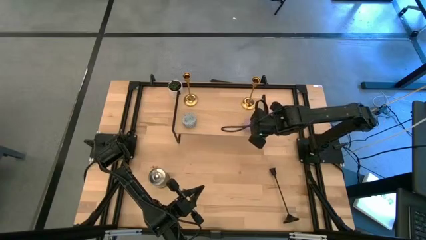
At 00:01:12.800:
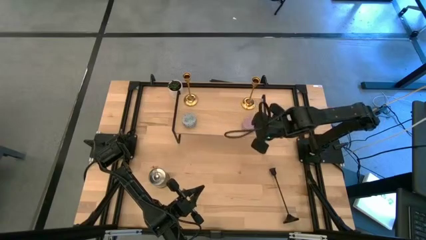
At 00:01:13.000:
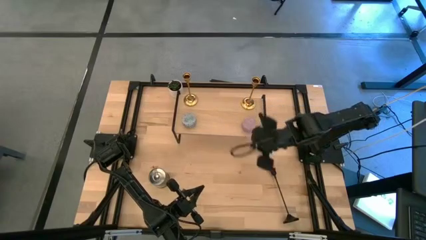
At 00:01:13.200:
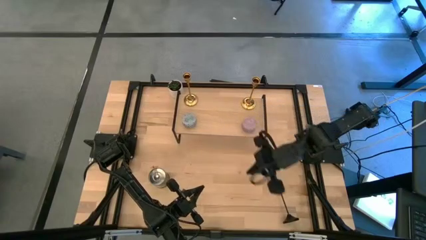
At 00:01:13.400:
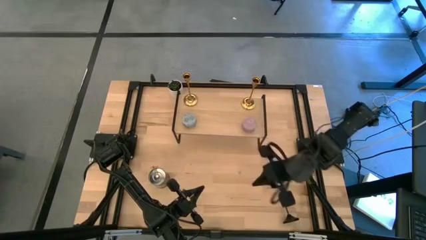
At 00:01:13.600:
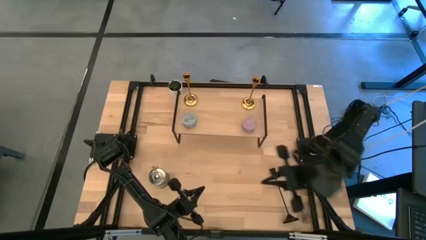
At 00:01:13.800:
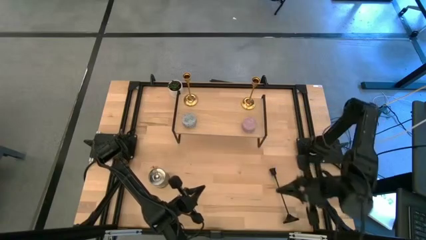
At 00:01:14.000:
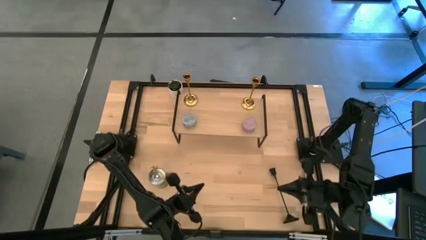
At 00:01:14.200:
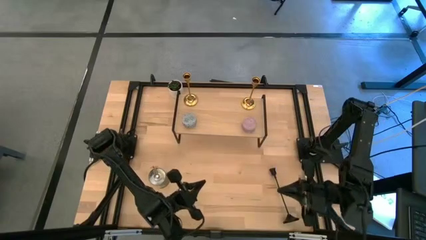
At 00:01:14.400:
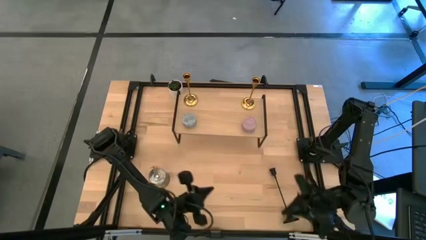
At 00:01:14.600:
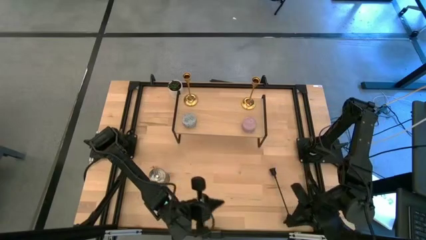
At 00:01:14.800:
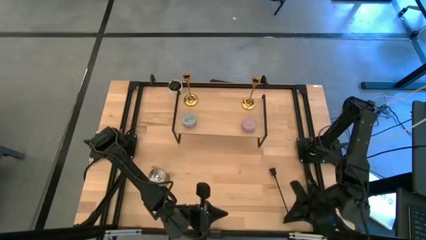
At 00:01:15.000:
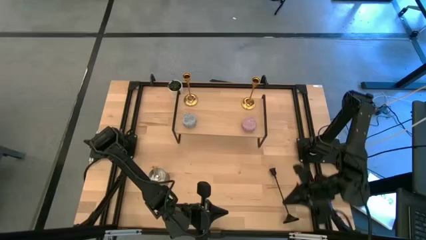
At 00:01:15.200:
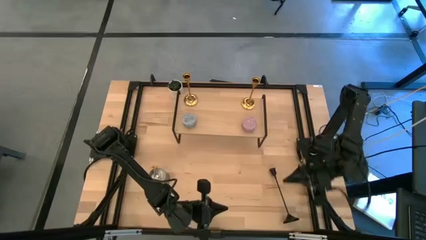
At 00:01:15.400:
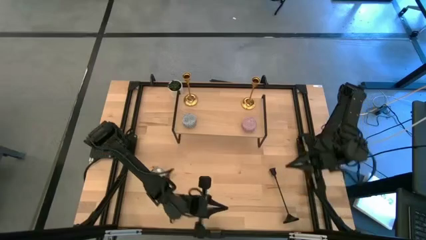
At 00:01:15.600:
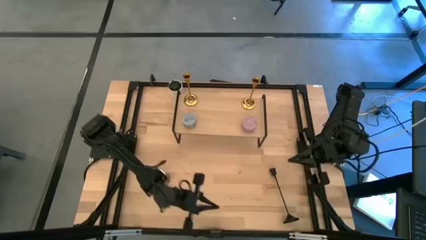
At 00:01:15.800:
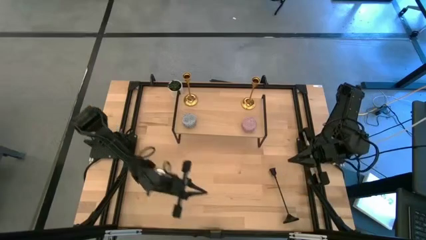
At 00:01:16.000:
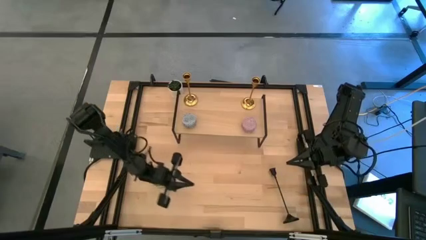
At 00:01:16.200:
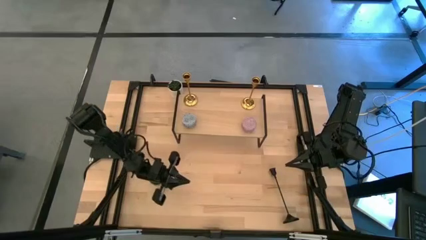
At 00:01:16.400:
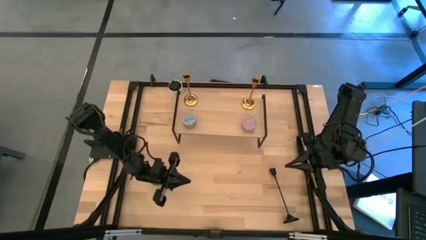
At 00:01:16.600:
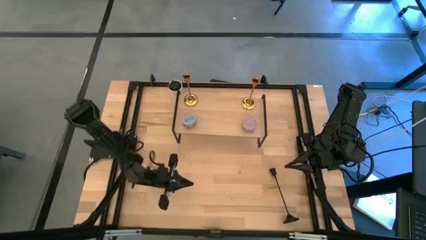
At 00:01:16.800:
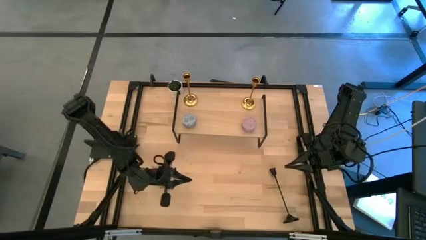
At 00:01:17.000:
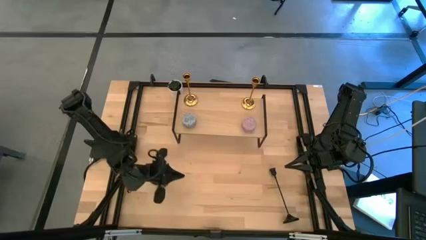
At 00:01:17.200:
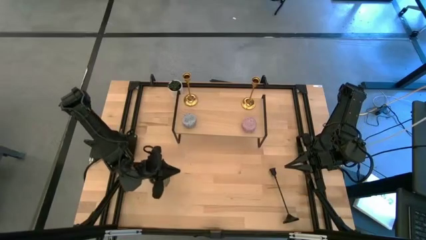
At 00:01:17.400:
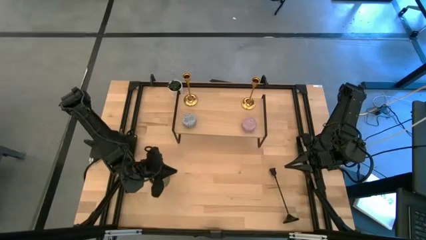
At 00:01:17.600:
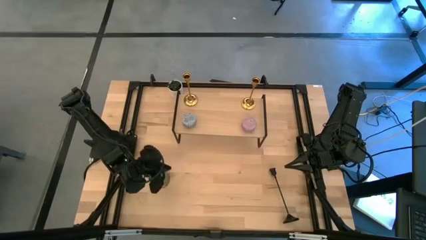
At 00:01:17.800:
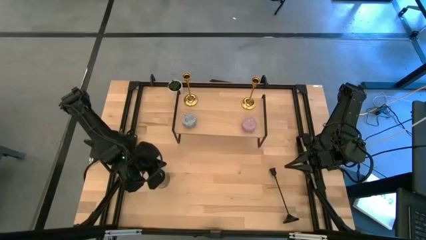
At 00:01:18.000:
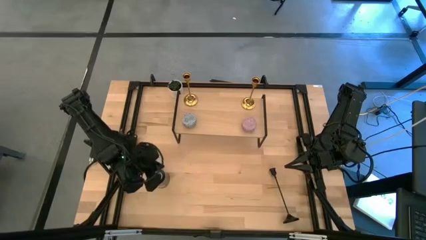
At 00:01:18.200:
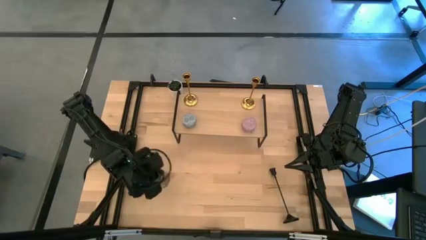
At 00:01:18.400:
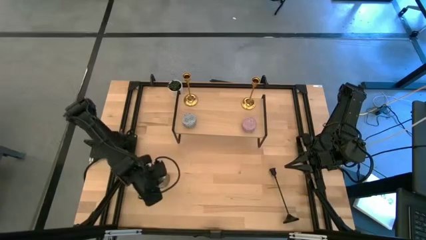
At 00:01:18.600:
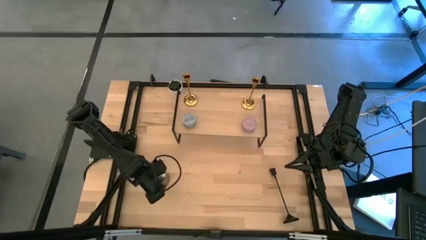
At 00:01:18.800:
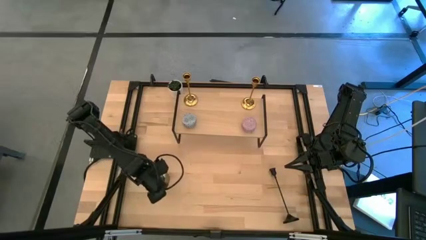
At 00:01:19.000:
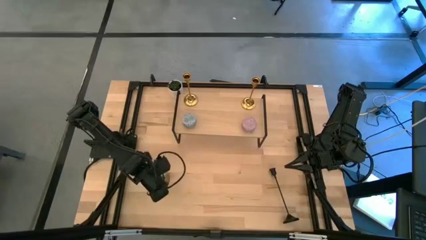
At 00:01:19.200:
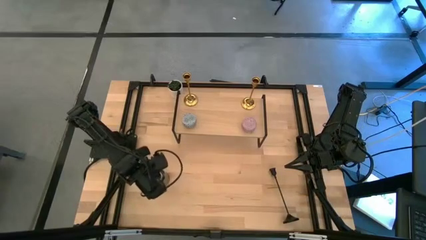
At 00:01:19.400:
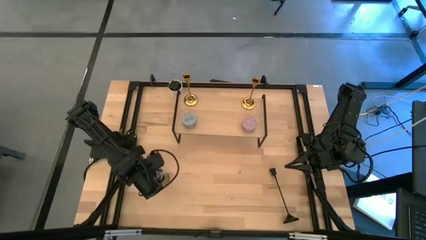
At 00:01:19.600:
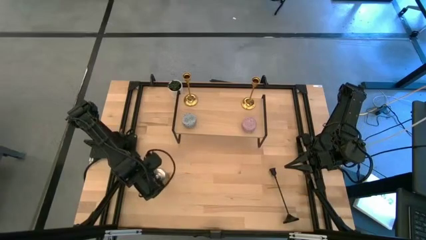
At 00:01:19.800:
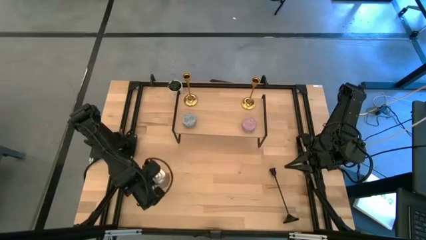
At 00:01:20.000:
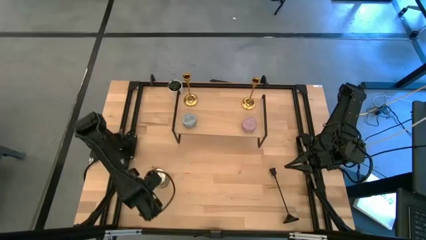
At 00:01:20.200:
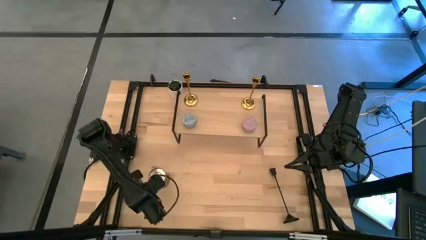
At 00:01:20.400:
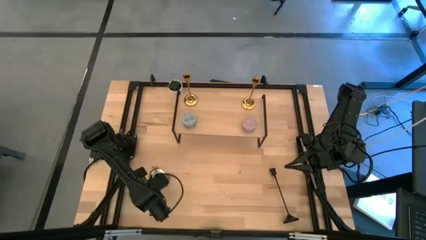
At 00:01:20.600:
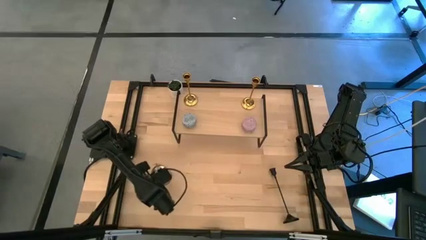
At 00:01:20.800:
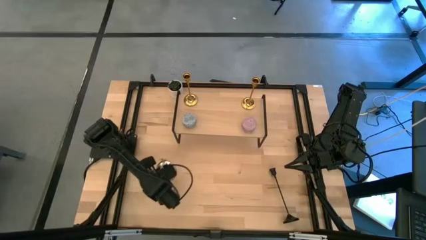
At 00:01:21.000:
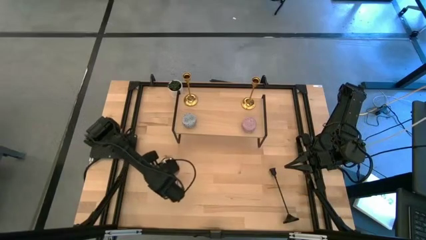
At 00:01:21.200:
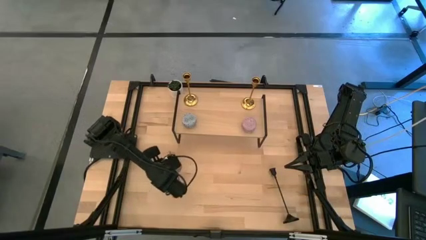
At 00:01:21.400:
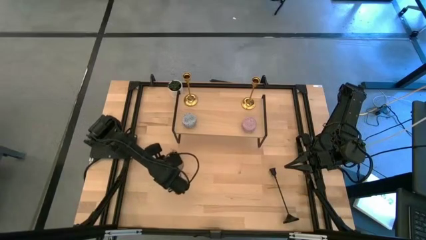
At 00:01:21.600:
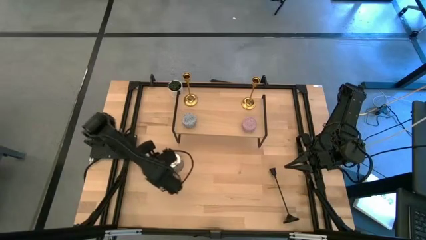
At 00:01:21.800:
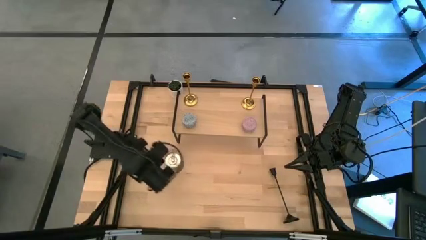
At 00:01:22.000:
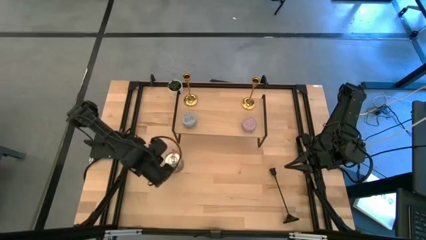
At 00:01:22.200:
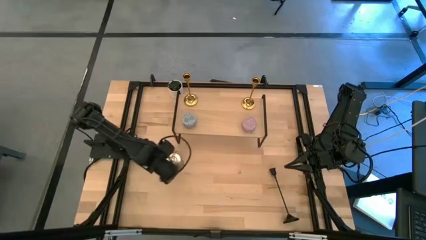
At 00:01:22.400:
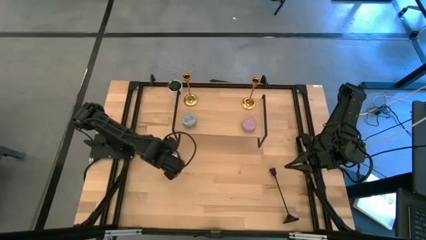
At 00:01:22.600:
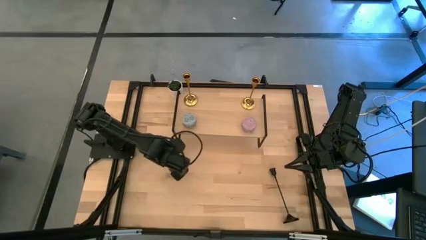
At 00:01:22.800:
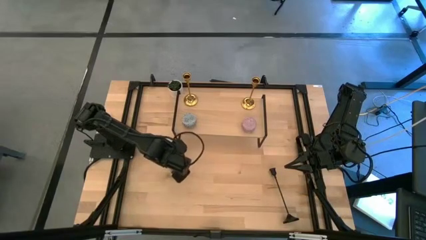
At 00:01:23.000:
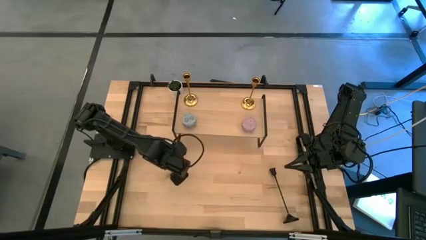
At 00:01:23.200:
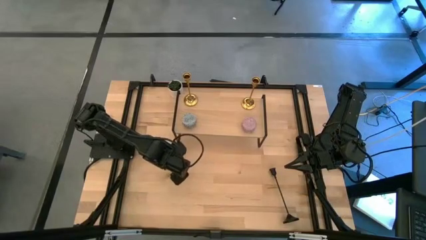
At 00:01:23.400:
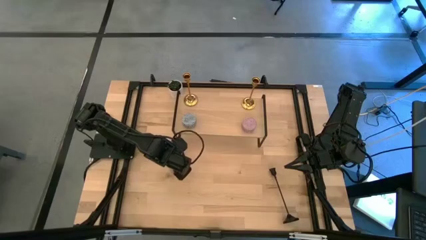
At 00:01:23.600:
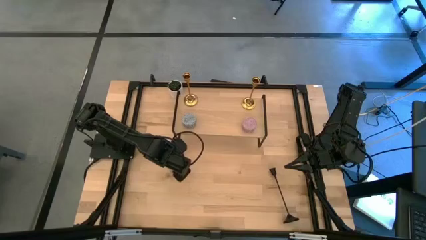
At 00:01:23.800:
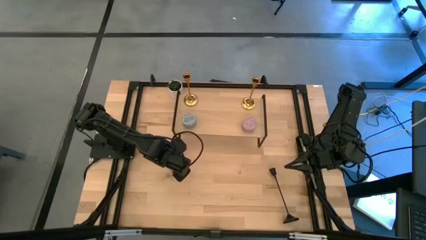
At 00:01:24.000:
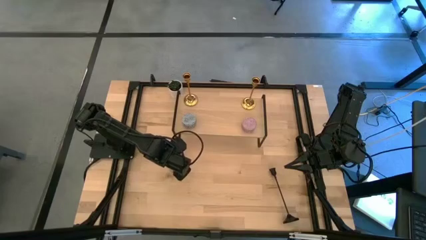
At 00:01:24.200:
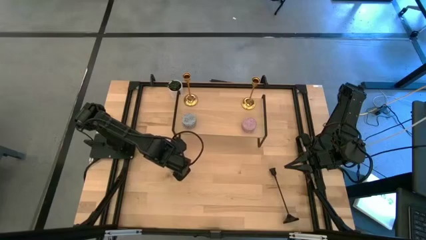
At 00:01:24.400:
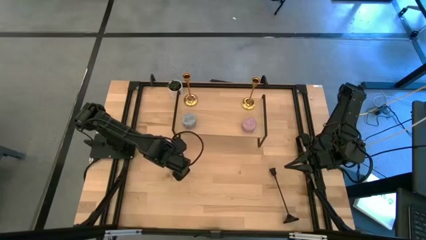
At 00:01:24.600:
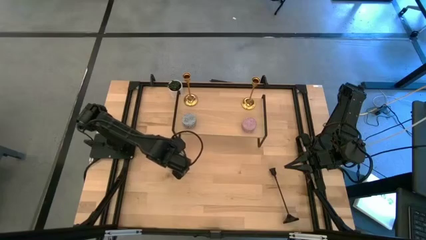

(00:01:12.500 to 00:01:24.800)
Task: Pick & Place candle stick holders
Put the silver scented candle on the shelf
